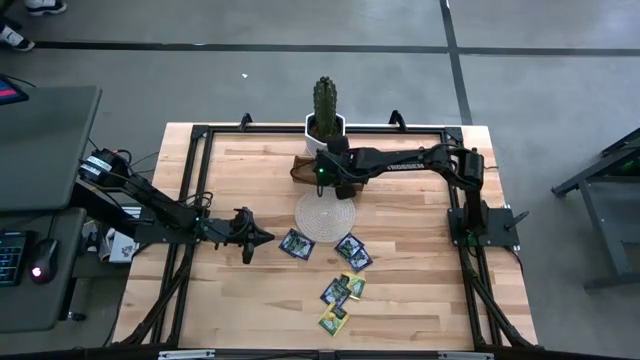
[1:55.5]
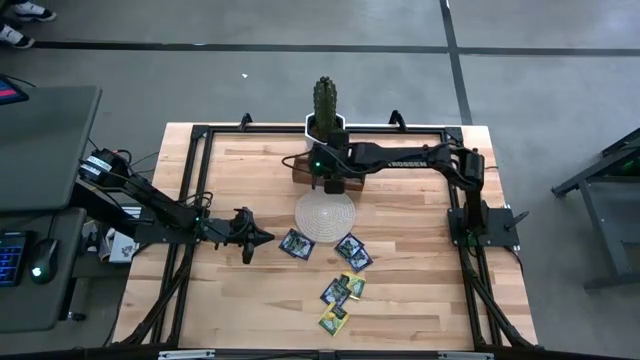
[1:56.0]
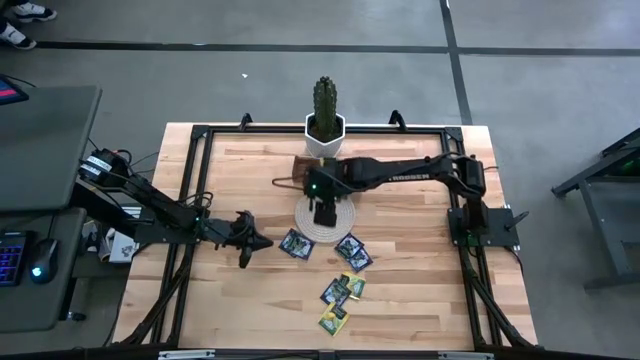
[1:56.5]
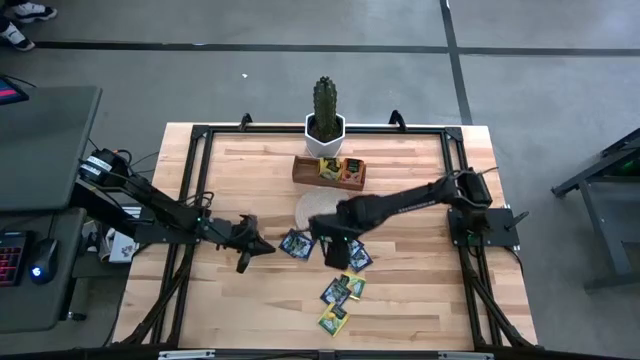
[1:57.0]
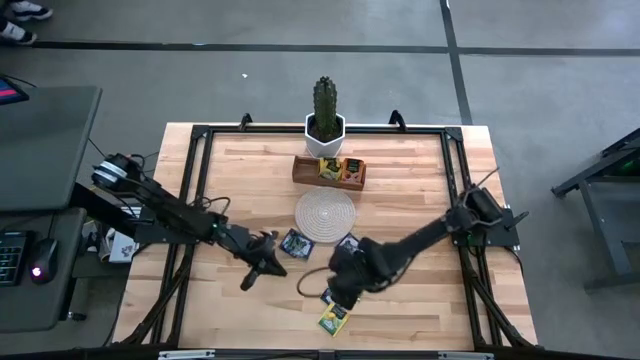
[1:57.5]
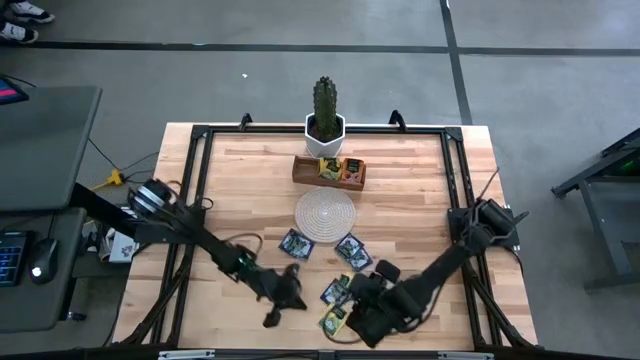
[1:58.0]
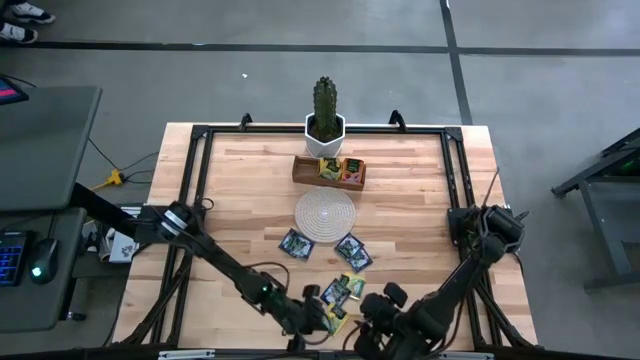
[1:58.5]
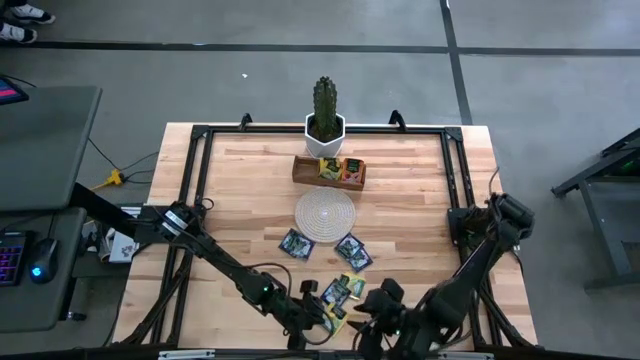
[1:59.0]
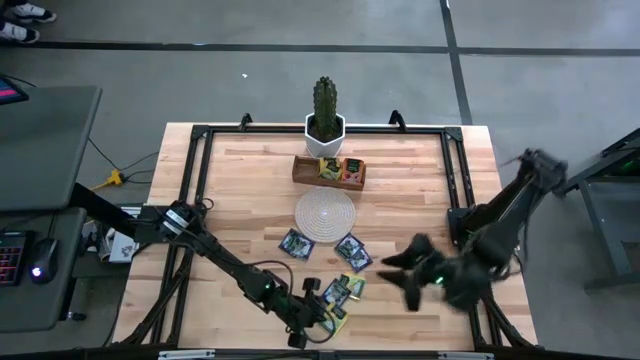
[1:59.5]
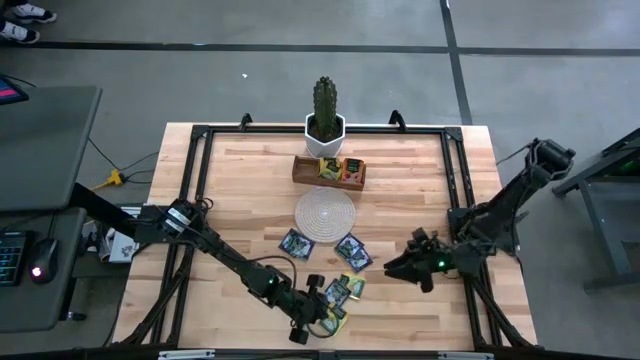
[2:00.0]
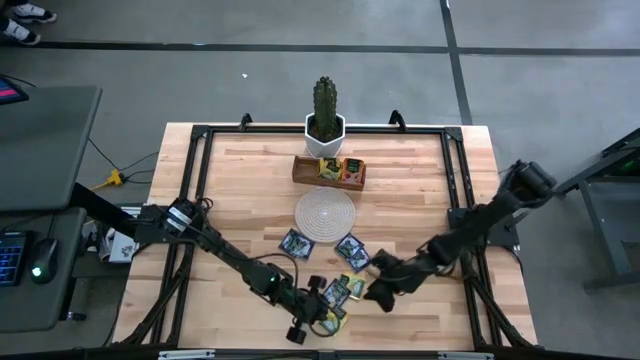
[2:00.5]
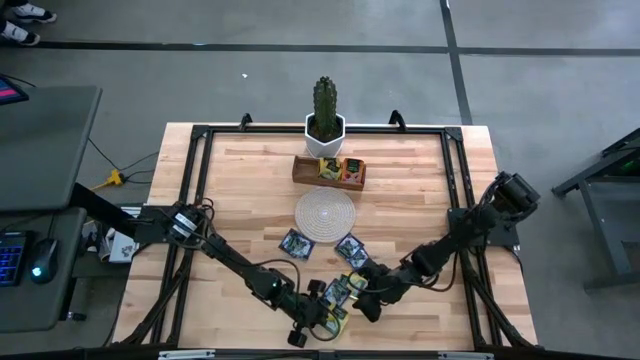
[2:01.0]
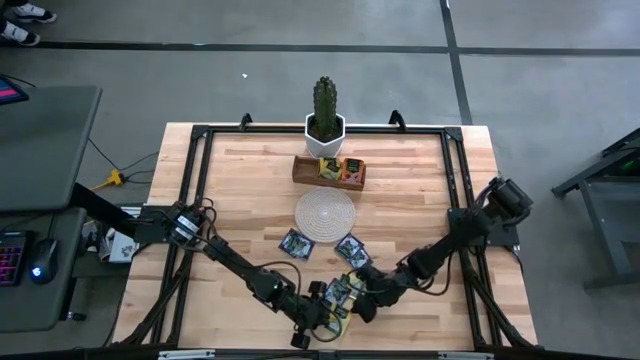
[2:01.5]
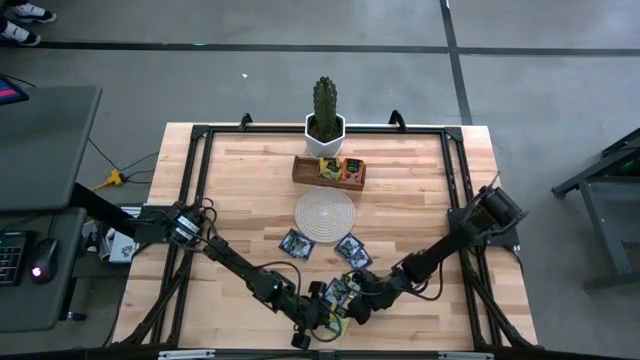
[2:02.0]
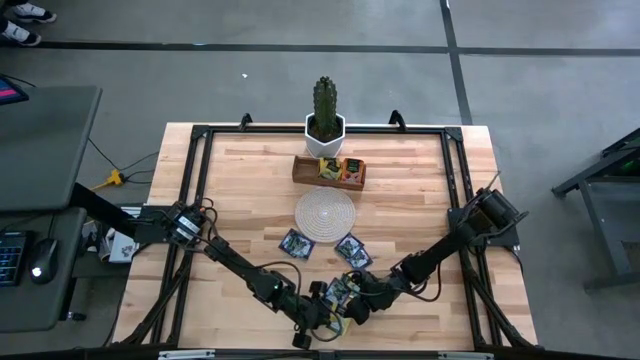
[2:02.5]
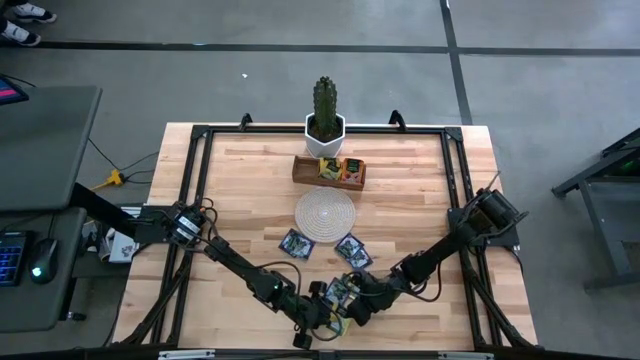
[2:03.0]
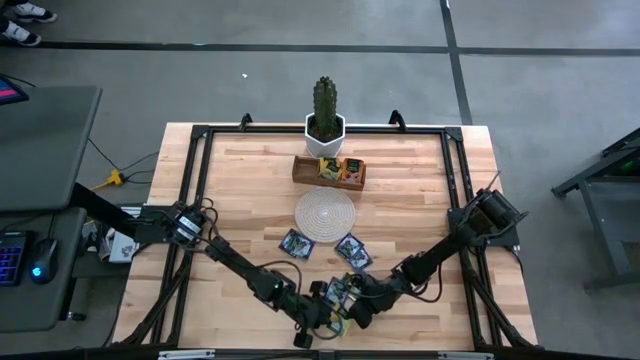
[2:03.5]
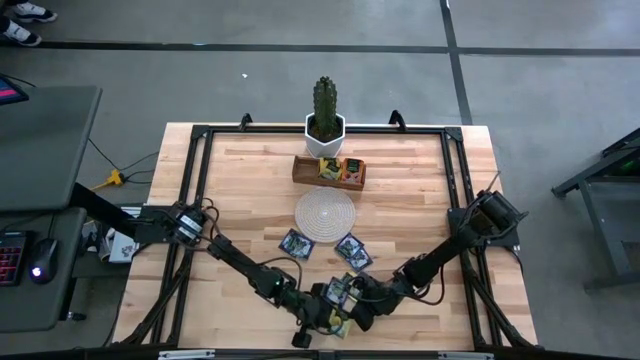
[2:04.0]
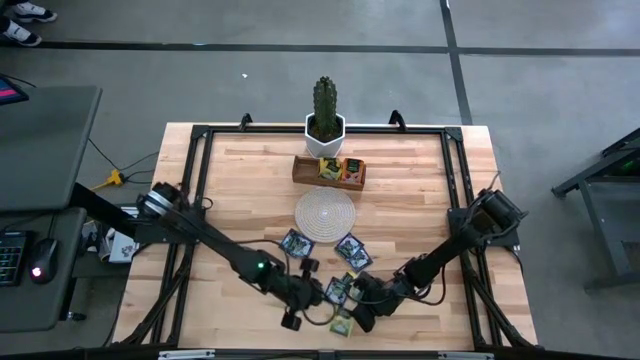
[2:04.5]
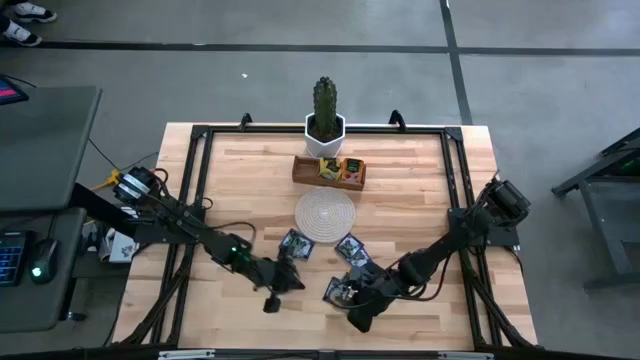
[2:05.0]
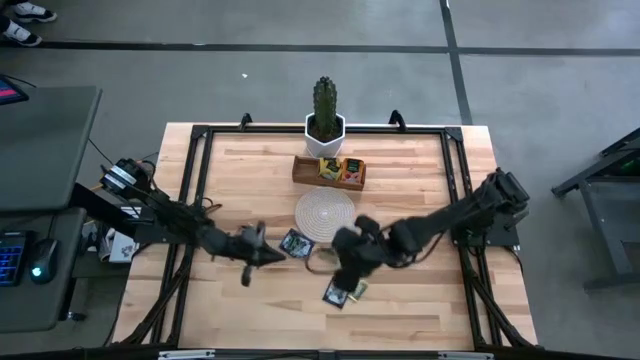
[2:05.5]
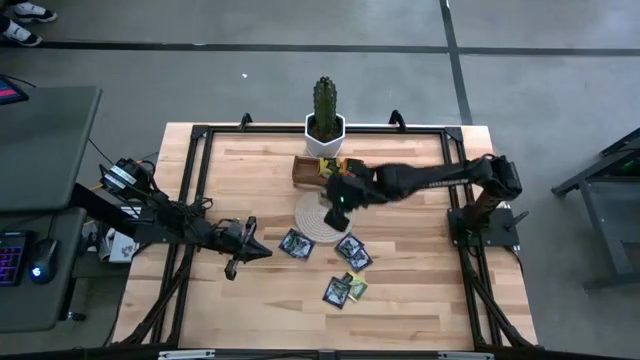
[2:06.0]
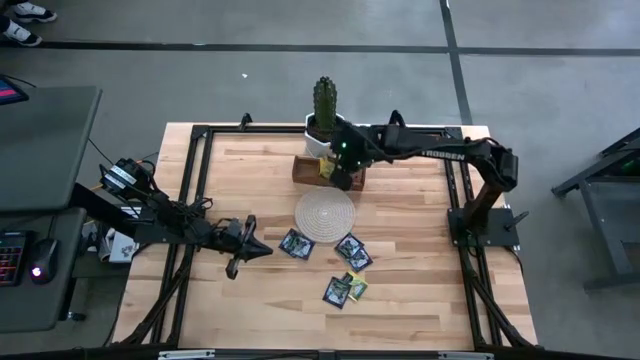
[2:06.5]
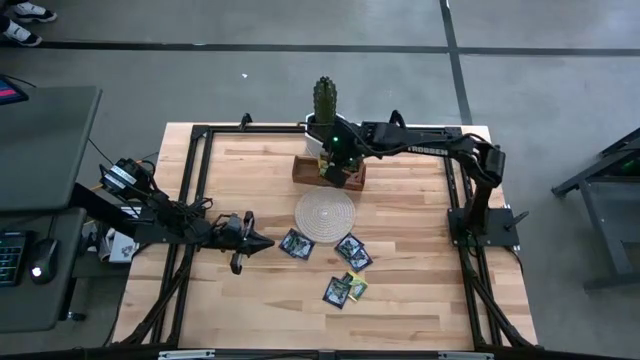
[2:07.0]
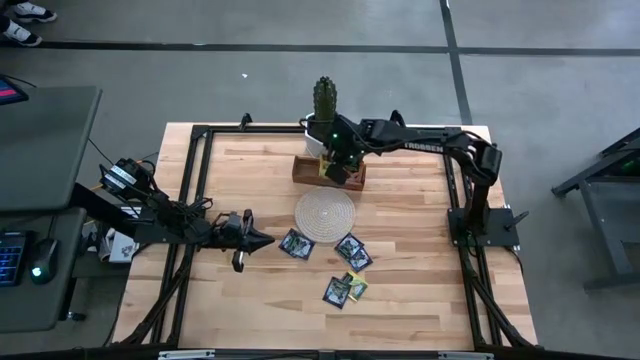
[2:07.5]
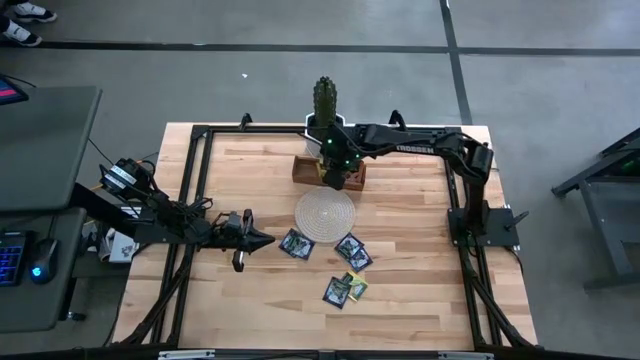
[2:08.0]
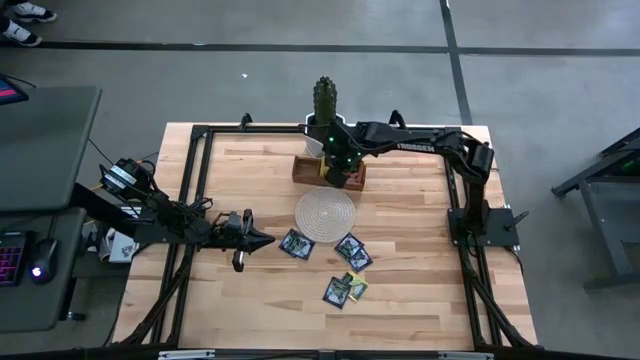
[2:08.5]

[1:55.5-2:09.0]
Task: Pick & Place Tea
Put the yellow tea bag into the middle compartment of the wooden organizer

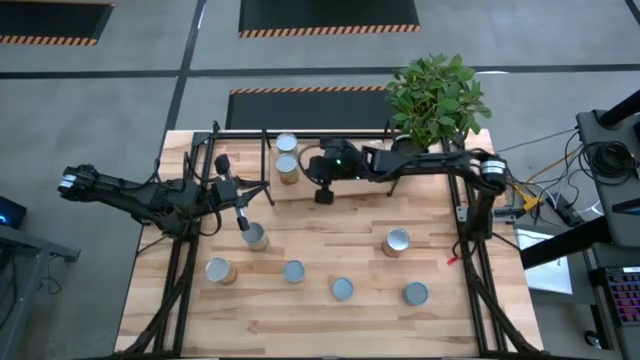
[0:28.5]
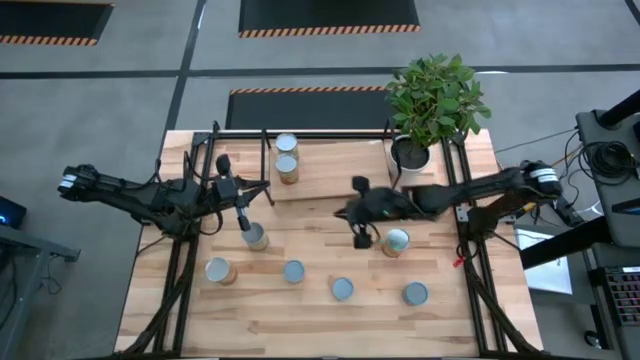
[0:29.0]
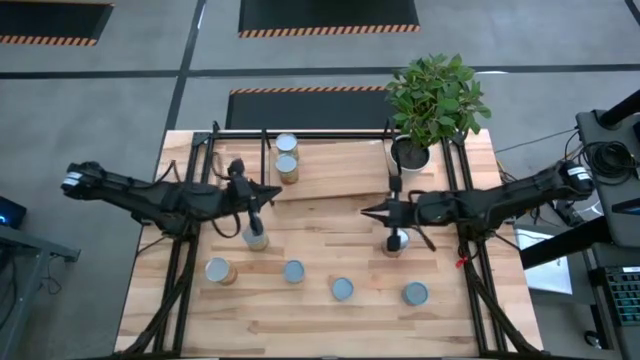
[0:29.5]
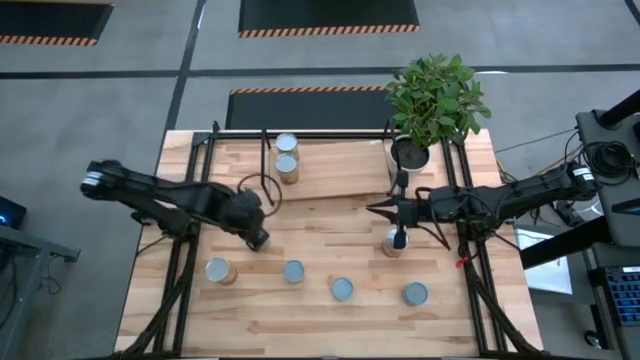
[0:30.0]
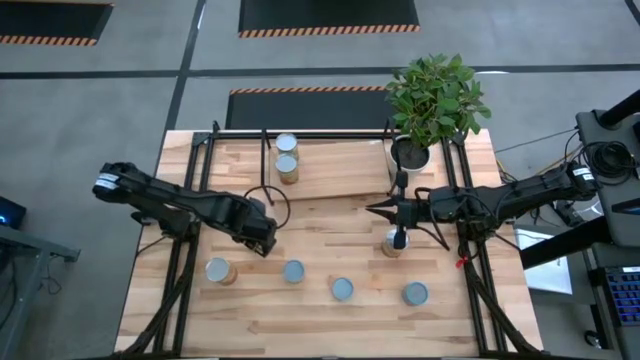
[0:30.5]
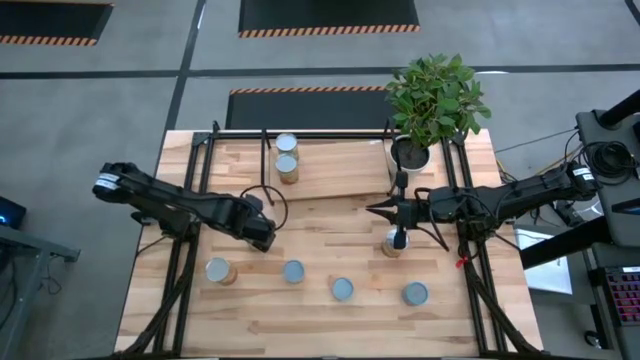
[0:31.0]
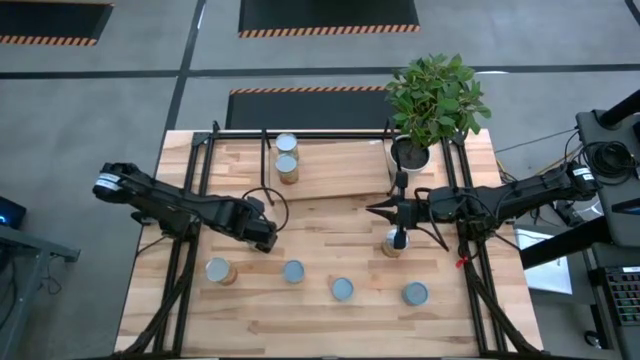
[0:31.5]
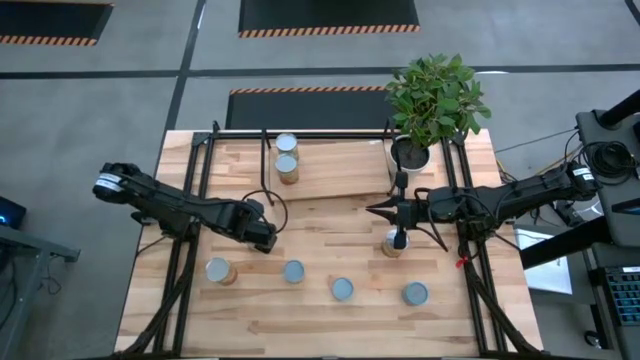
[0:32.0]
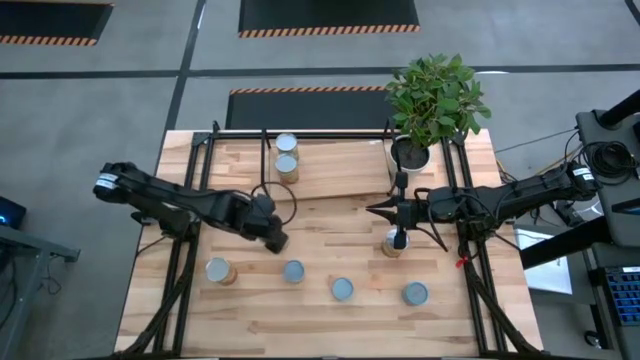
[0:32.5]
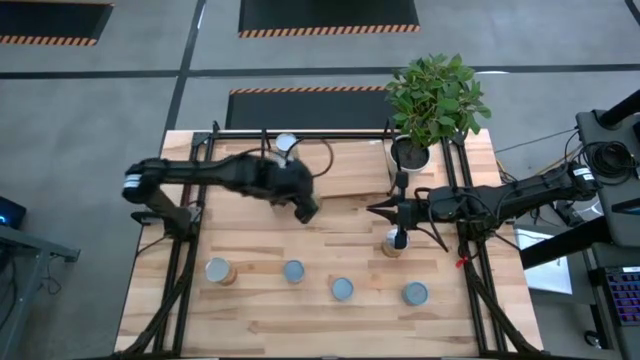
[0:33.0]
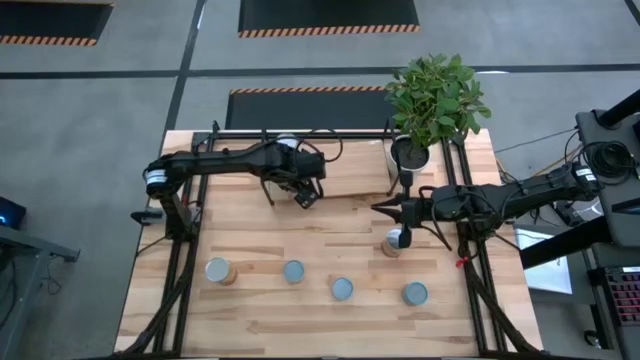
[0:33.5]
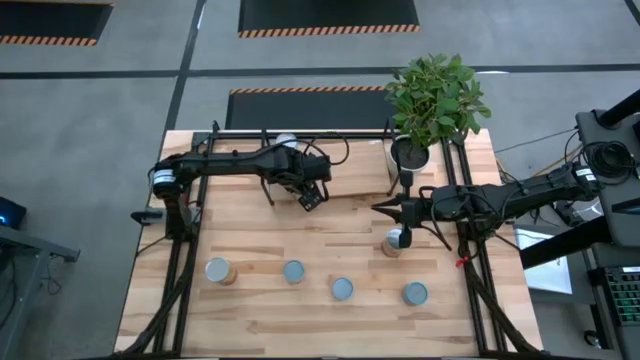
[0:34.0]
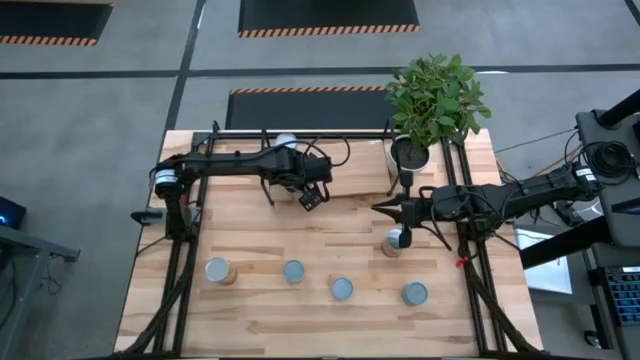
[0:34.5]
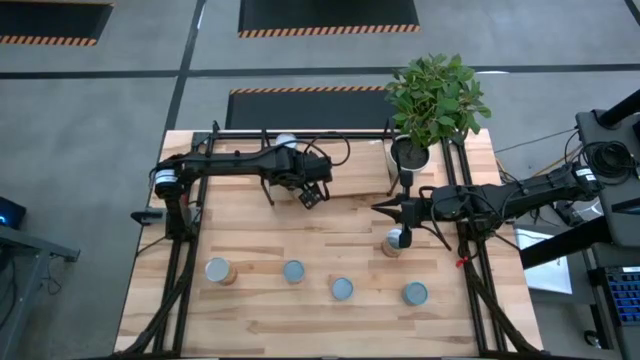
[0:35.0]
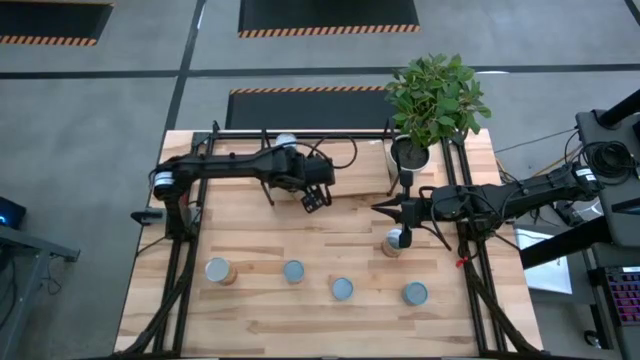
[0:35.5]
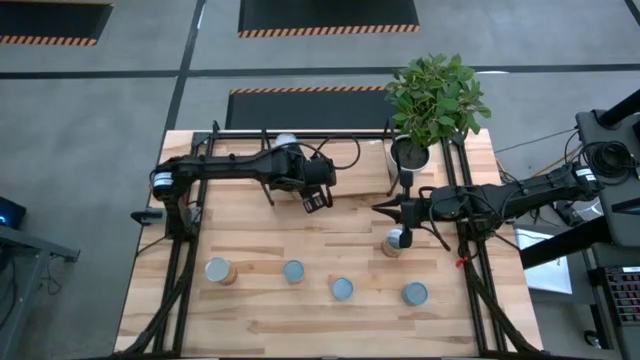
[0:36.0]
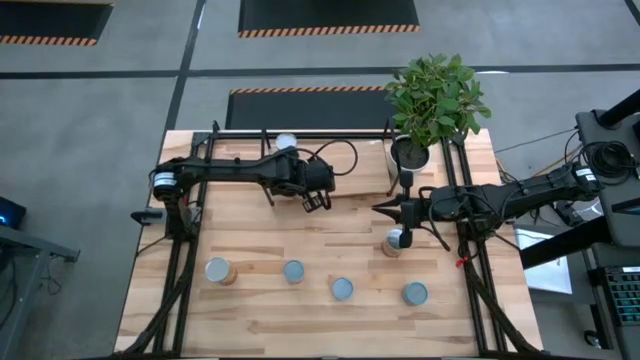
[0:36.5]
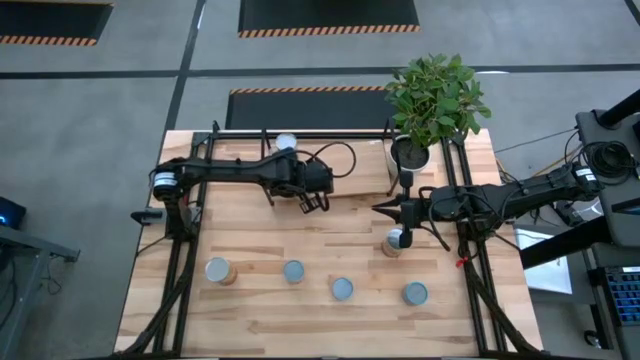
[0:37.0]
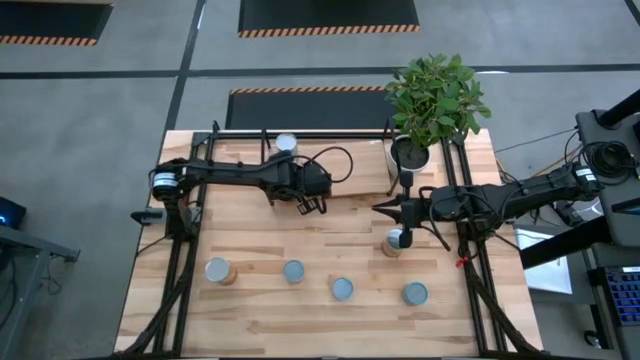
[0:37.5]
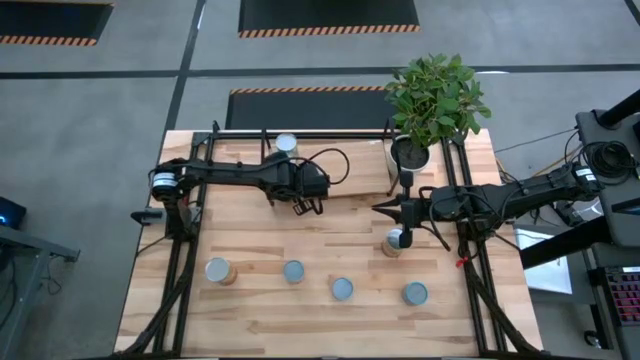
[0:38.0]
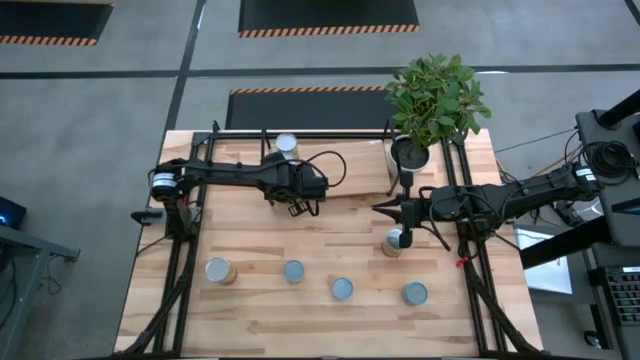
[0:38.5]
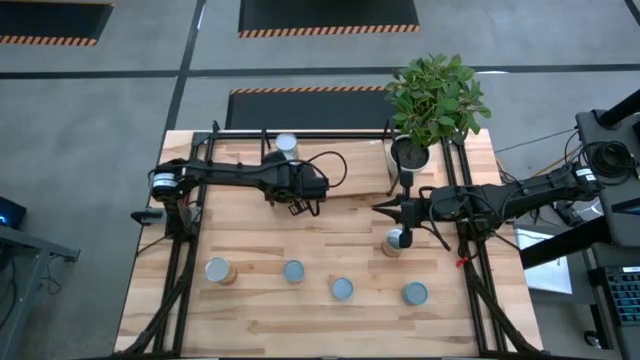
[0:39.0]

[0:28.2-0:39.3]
Task: Pick and place cans onto a shelf
Put the canned oranges on the shelf
